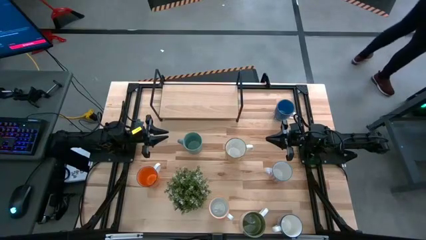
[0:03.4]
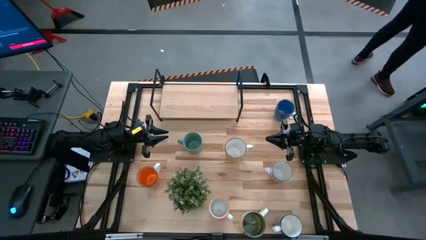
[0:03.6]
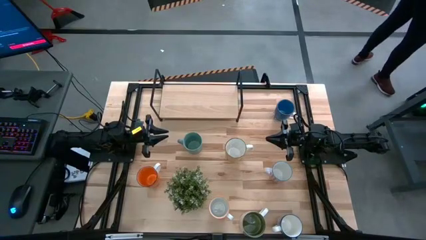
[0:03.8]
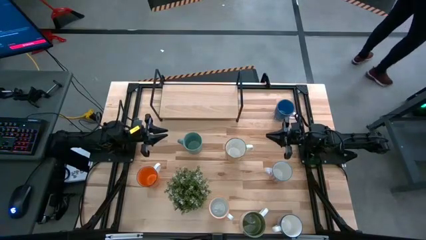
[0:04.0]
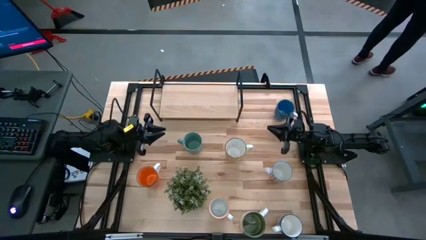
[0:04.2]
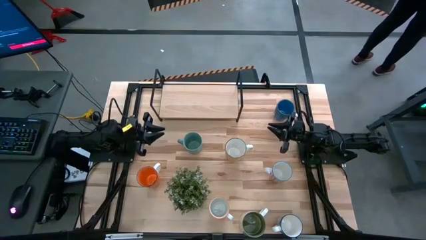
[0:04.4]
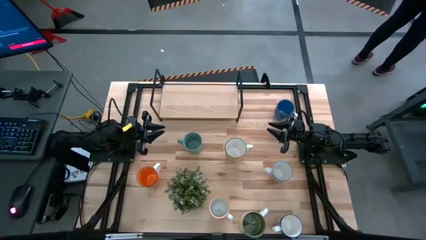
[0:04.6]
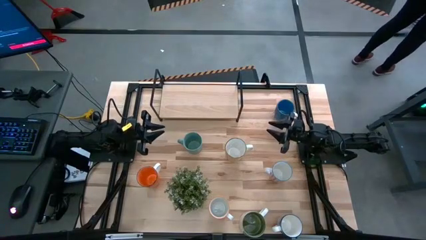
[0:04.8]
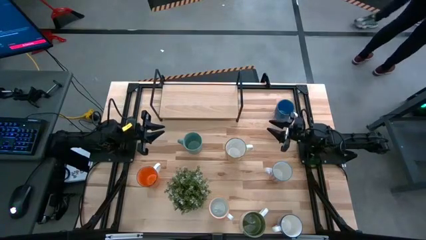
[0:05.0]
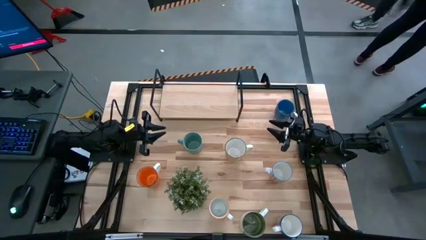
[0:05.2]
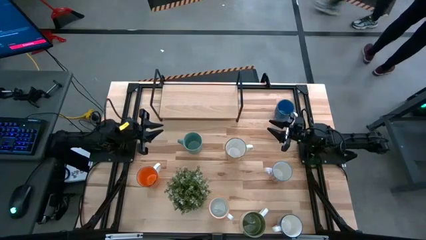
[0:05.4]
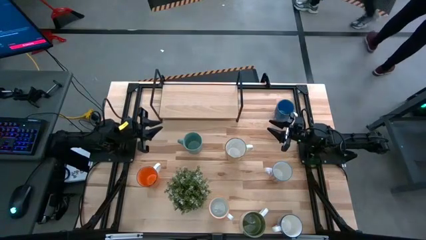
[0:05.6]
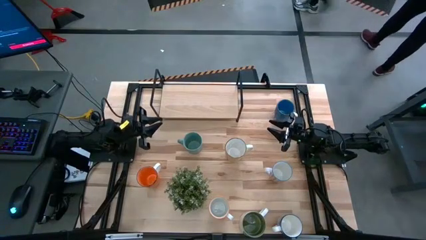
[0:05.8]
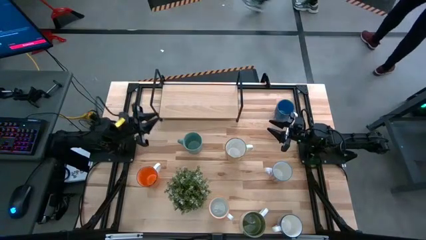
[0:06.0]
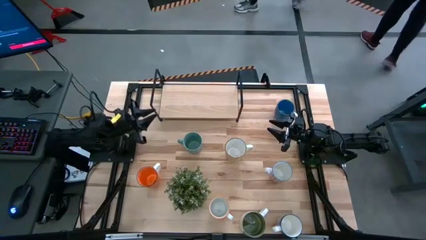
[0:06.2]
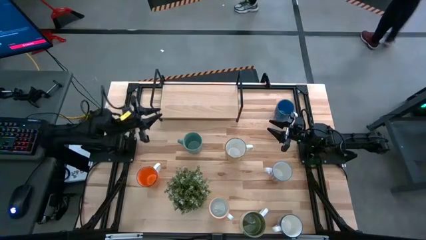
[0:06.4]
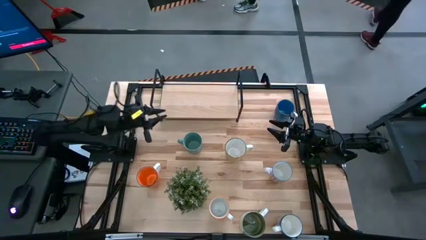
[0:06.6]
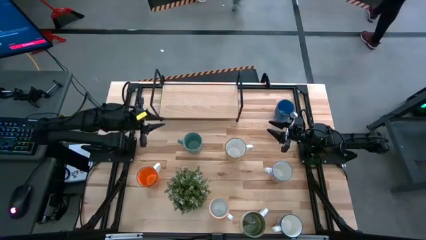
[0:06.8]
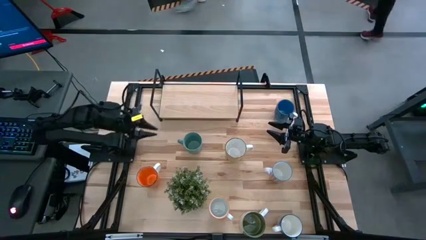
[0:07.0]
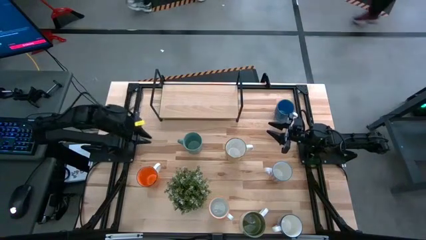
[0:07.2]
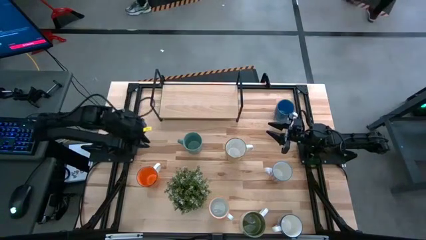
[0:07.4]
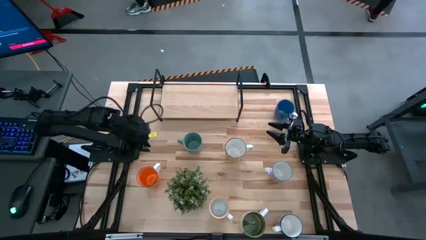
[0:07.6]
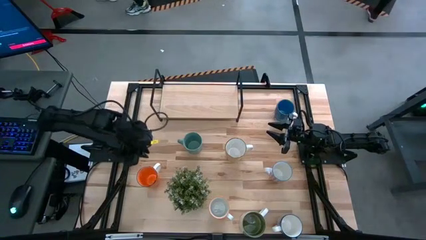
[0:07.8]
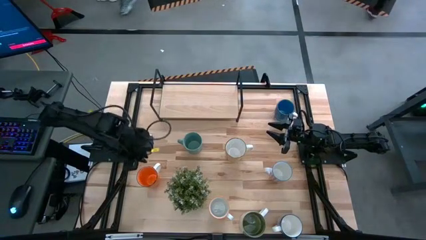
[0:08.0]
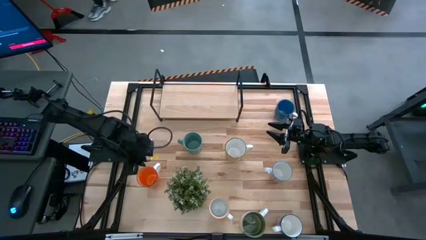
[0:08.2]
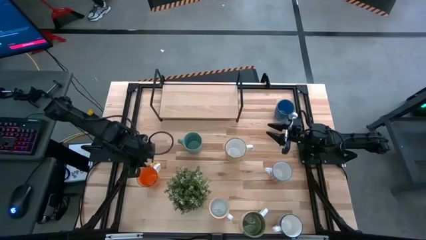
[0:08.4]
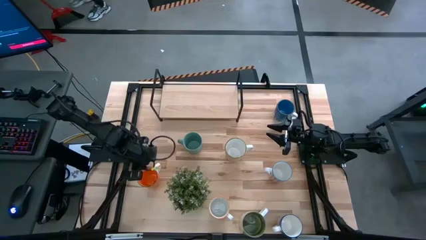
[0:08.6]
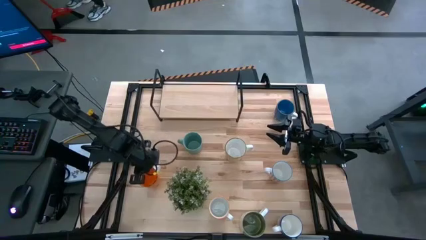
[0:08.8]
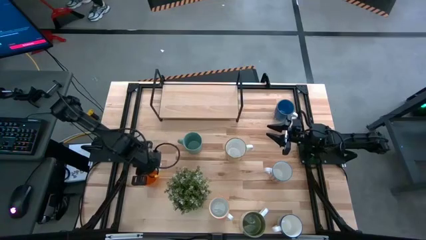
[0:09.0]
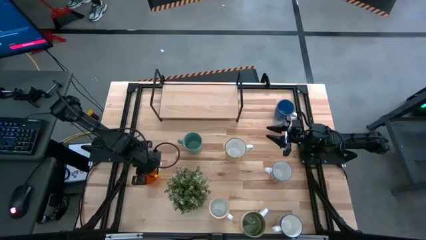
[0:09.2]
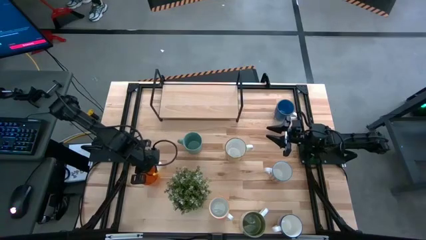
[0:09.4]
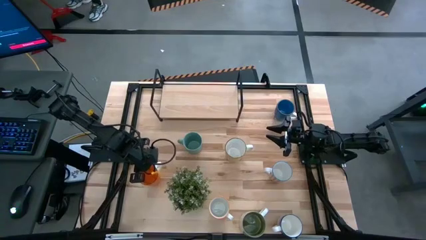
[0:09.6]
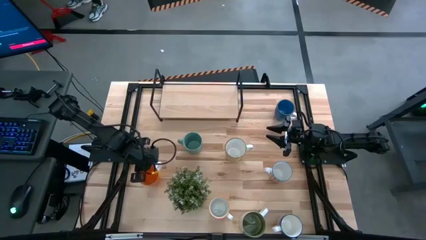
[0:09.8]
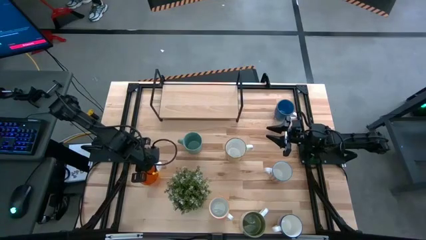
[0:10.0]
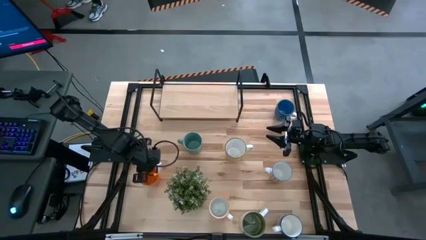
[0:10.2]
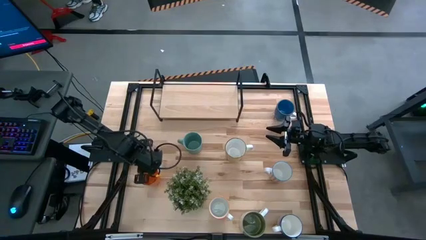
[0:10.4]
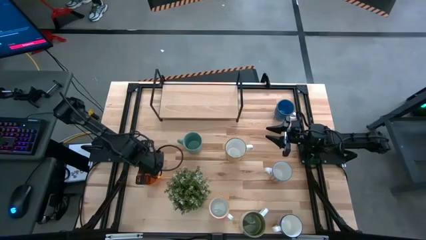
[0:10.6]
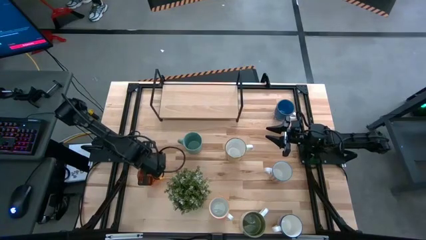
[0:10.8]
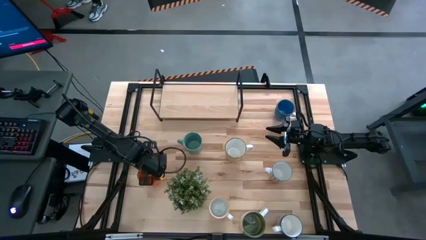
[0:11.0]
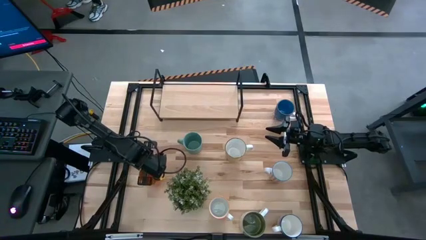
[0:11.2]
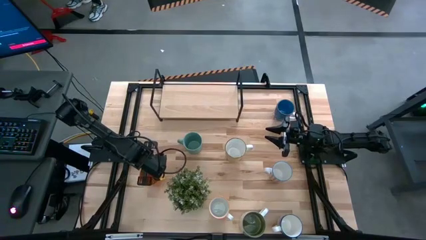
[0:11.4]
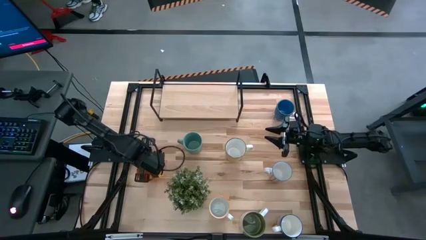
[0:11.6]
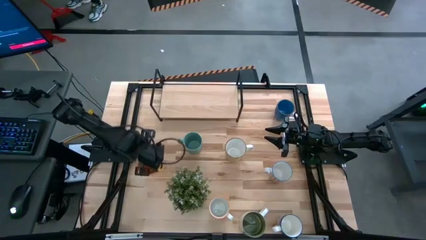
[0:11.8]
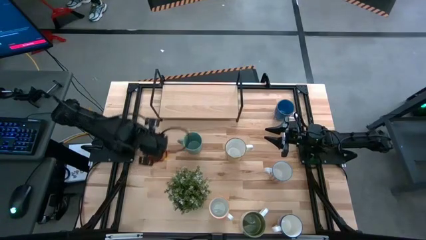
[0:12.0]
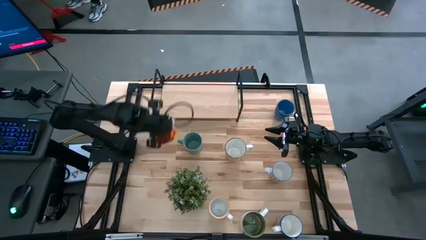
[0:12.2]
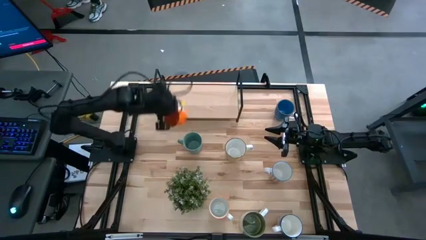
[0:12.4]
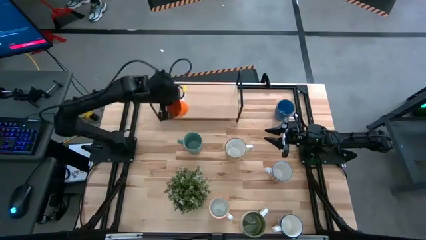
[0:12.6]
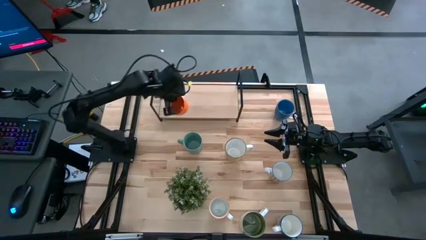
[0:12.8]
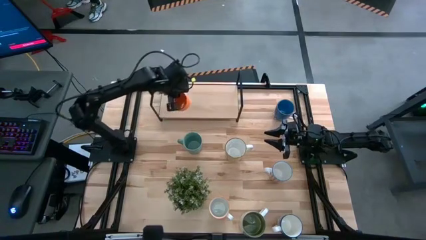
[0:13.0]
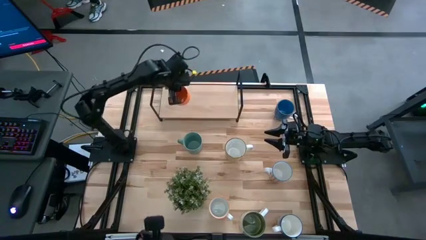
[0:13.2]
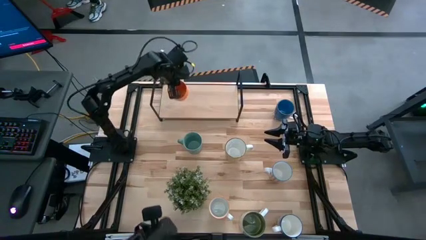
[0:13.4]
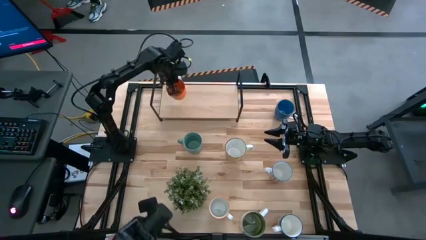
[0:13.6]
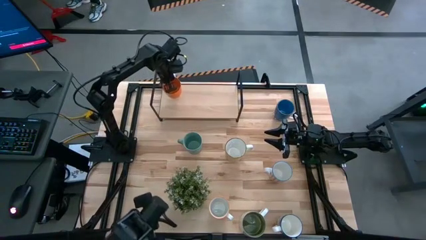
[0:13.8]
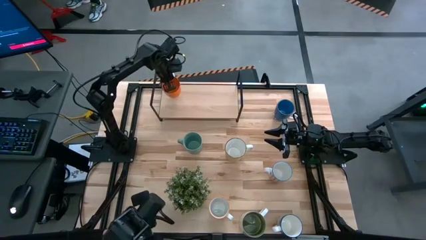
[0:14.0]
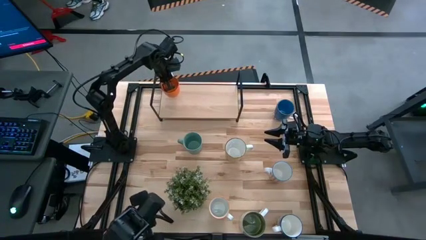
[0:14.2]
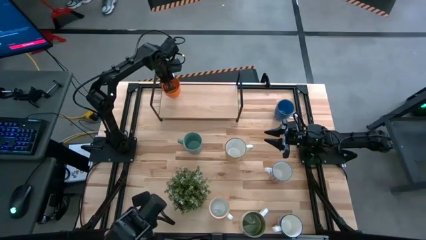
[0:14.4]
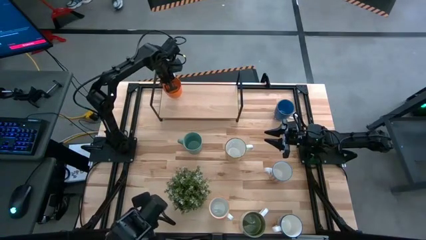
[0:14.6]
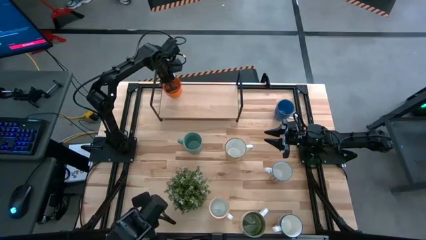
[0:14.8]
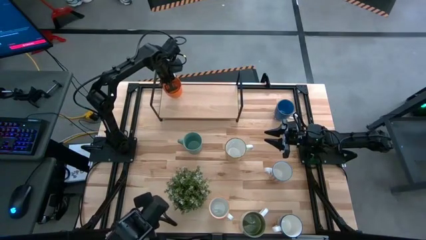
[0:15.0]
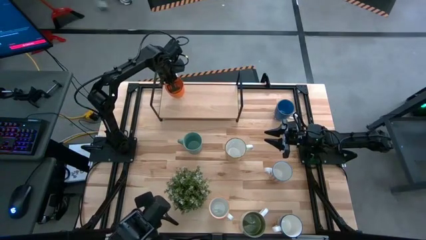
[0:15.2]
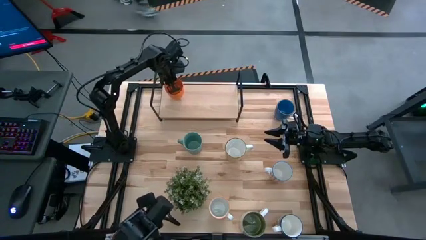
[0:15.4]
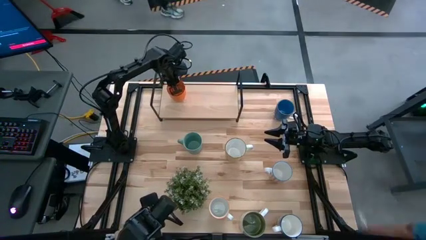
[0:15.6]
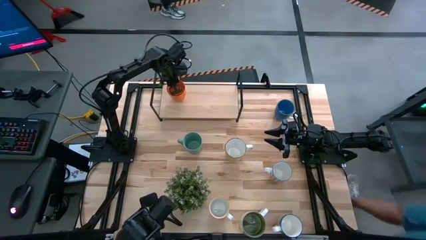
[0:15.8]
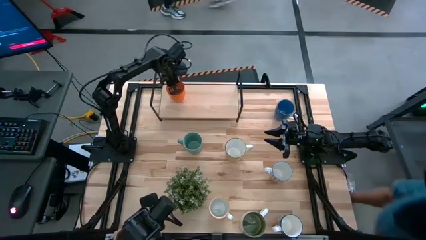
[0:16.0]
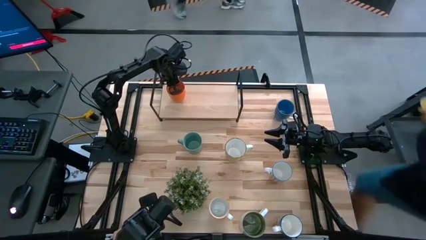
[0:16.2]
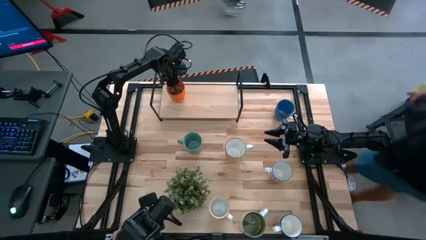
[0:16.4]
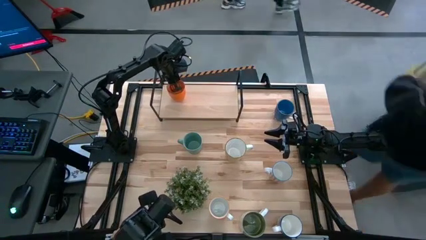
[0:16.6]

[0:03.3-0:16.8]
Task: Place coffee mugs
Put the orange mug on the shelf
